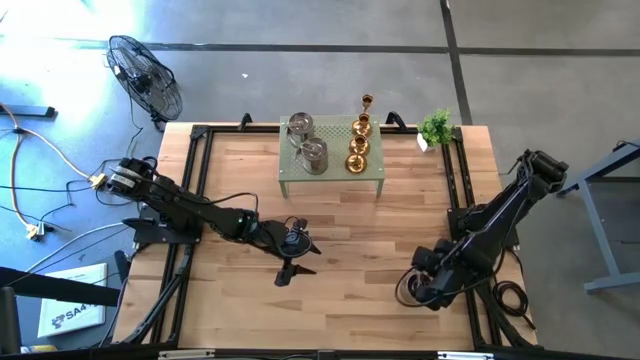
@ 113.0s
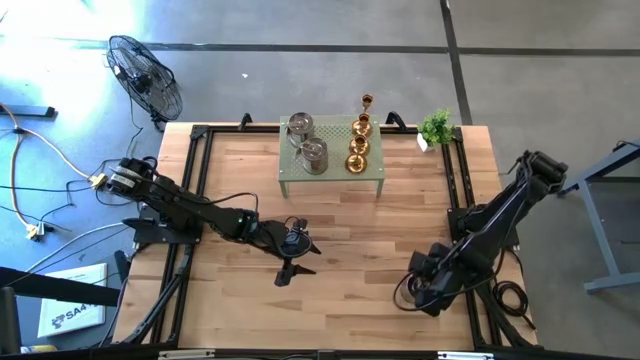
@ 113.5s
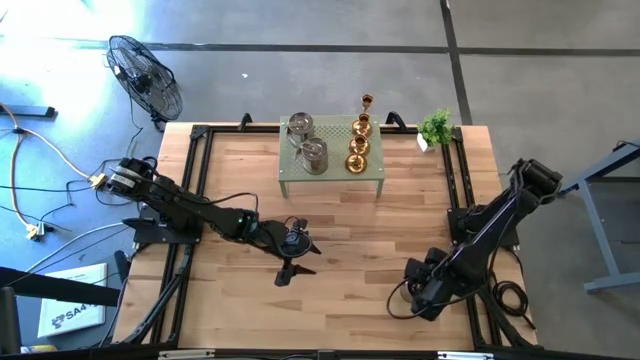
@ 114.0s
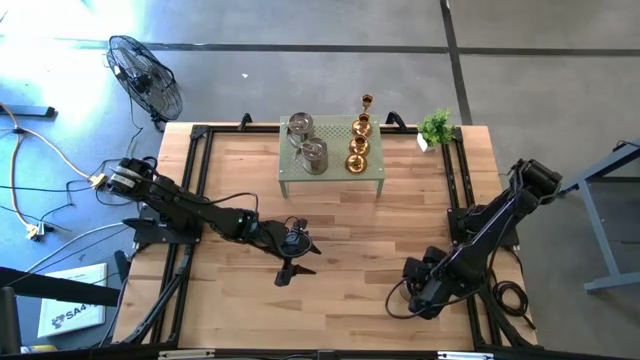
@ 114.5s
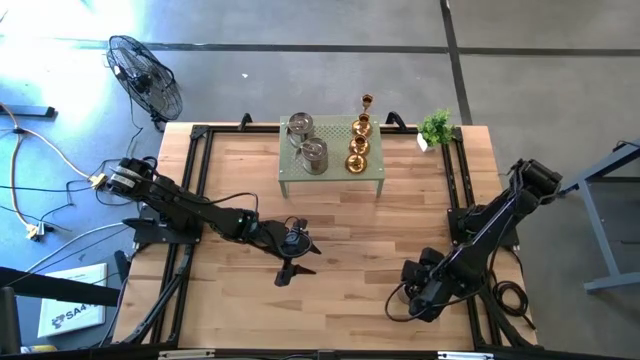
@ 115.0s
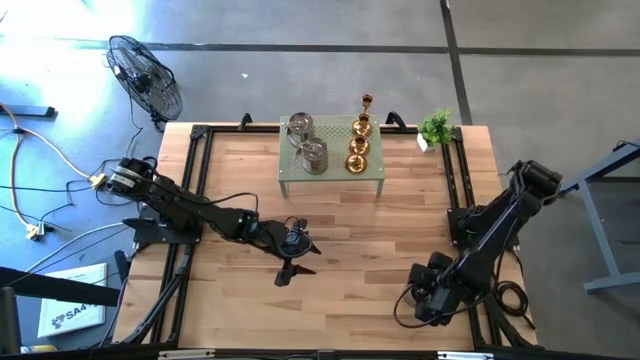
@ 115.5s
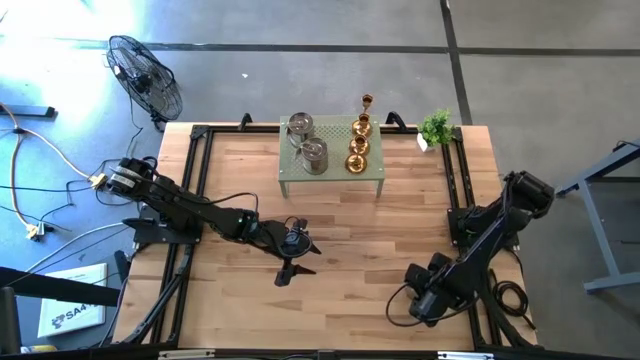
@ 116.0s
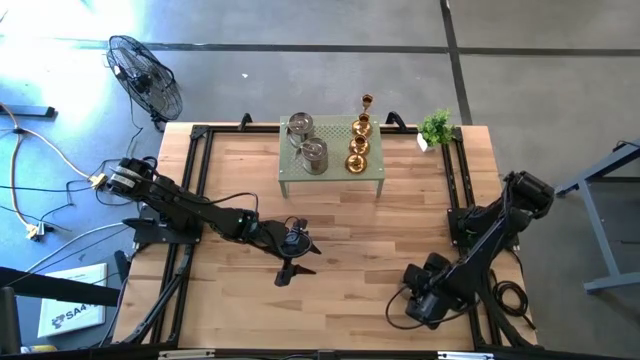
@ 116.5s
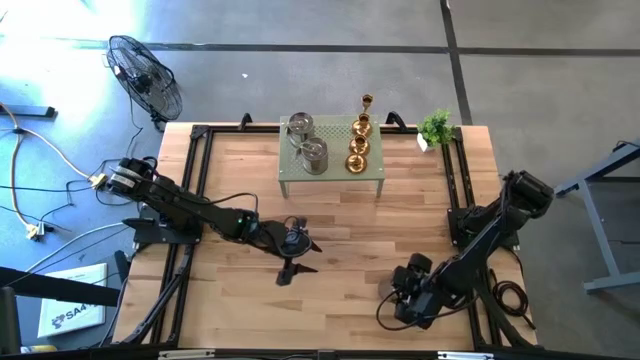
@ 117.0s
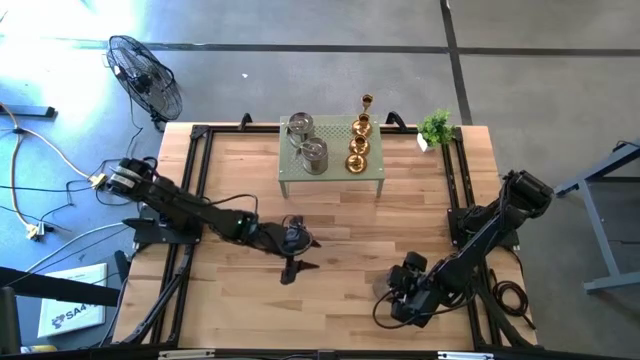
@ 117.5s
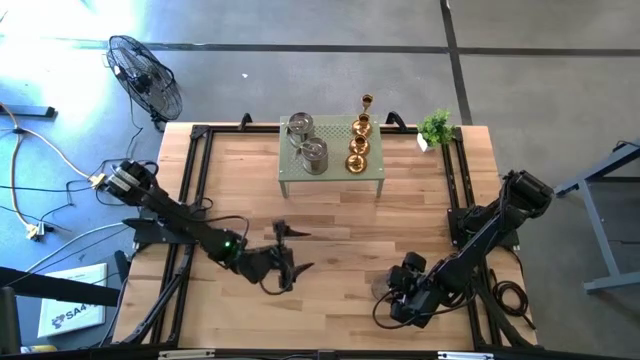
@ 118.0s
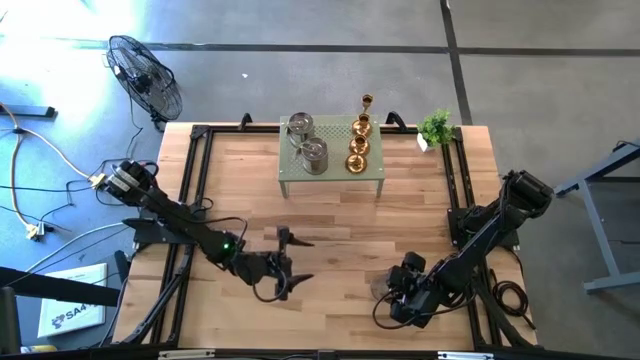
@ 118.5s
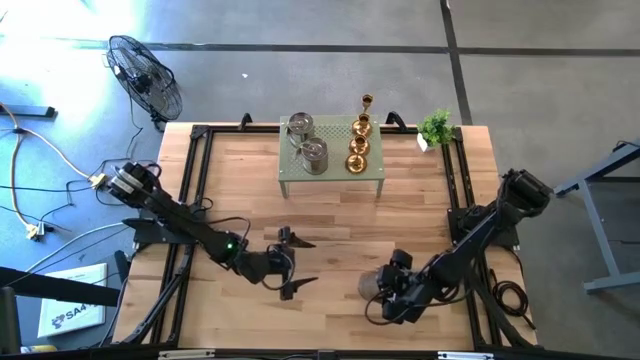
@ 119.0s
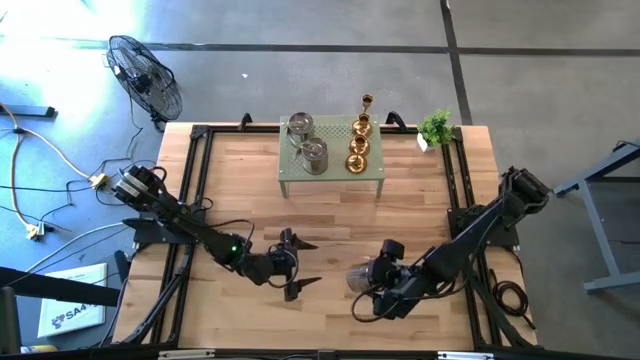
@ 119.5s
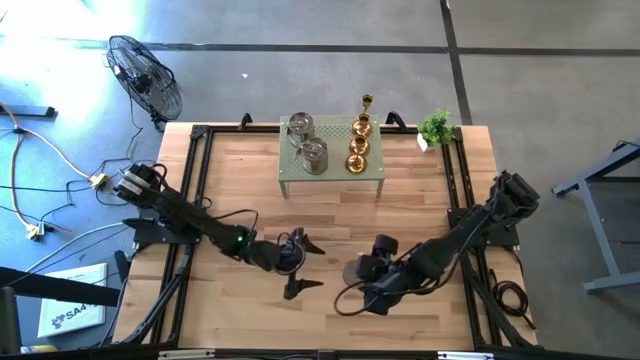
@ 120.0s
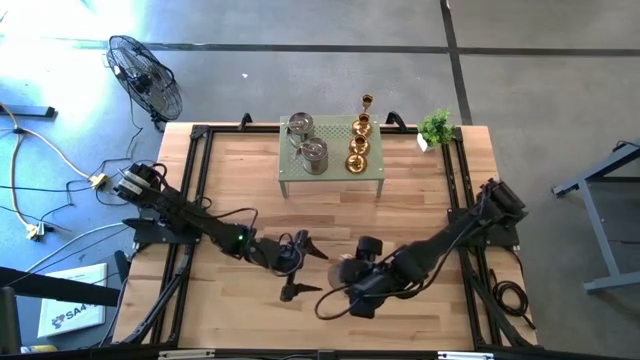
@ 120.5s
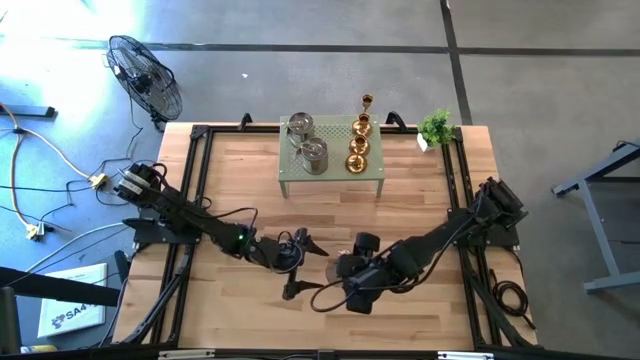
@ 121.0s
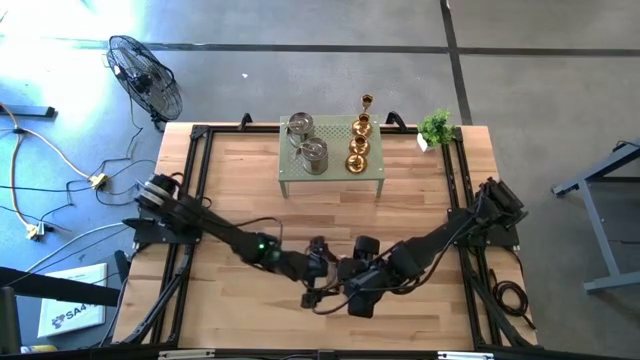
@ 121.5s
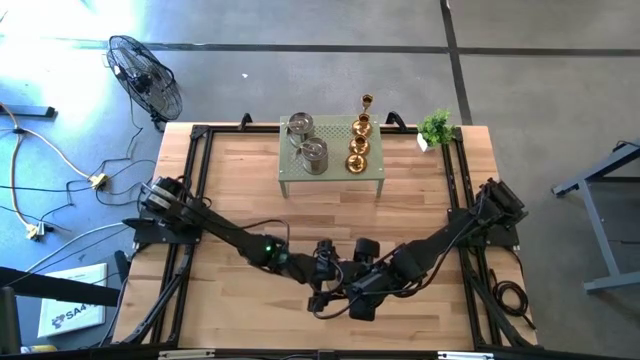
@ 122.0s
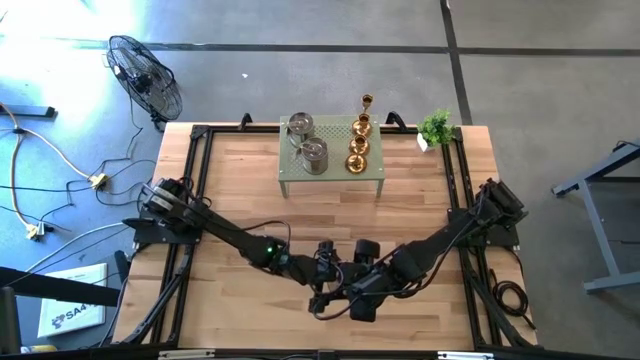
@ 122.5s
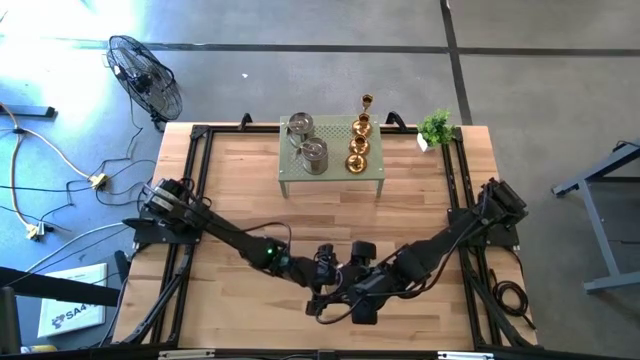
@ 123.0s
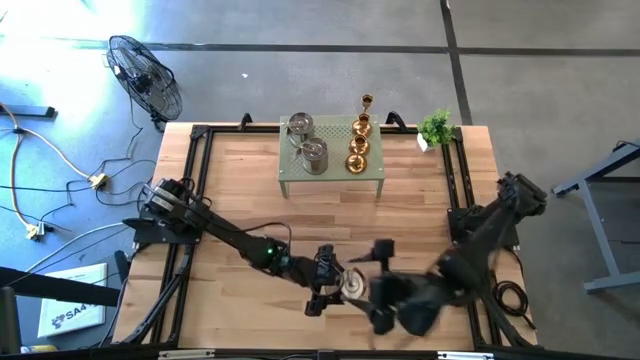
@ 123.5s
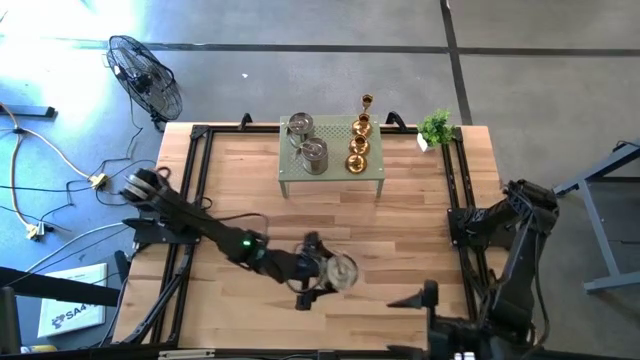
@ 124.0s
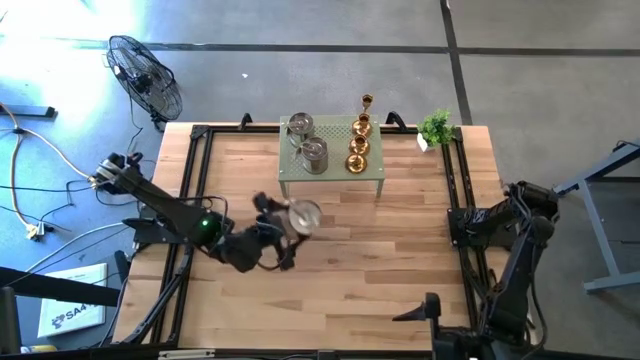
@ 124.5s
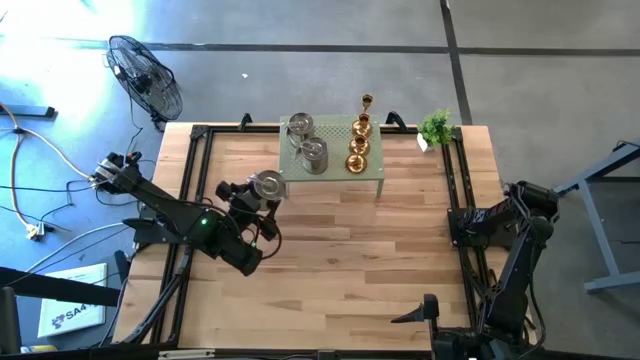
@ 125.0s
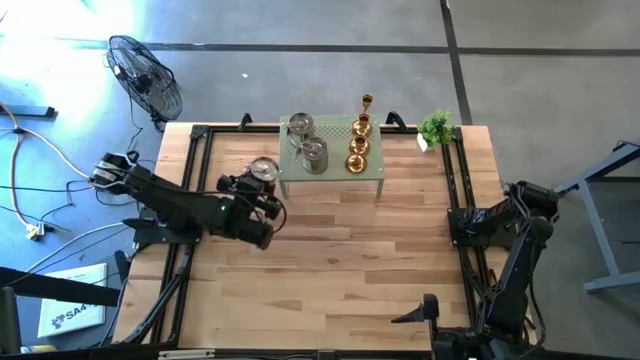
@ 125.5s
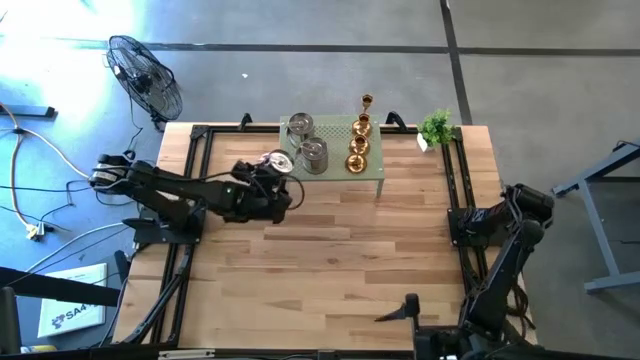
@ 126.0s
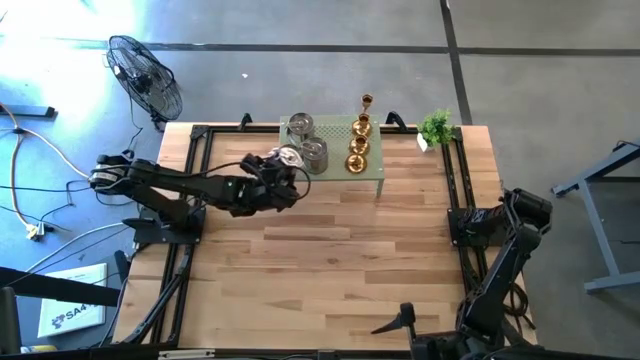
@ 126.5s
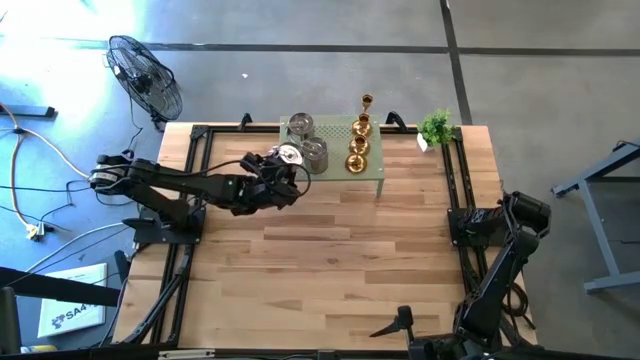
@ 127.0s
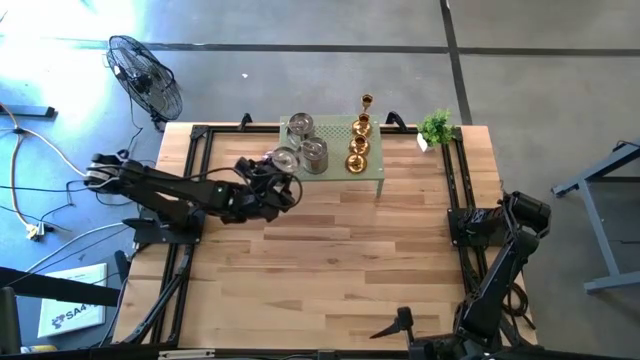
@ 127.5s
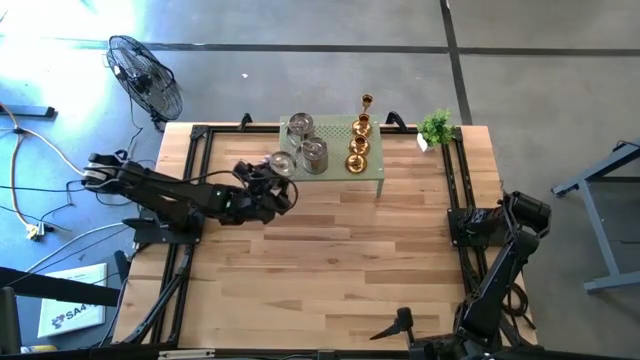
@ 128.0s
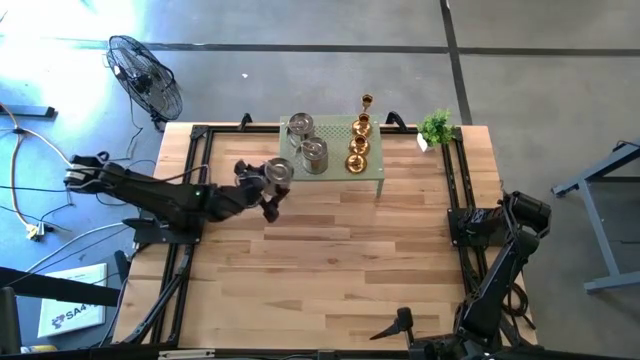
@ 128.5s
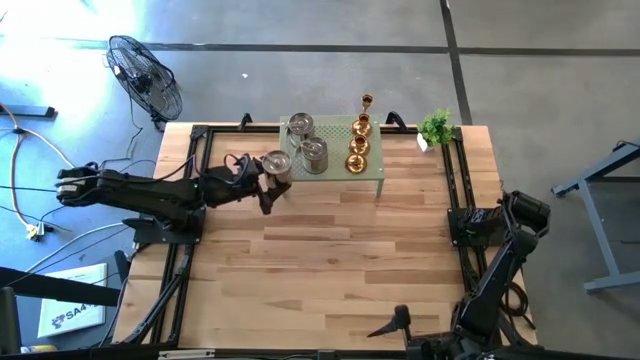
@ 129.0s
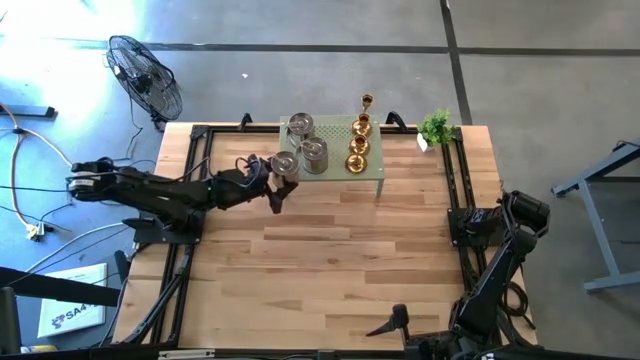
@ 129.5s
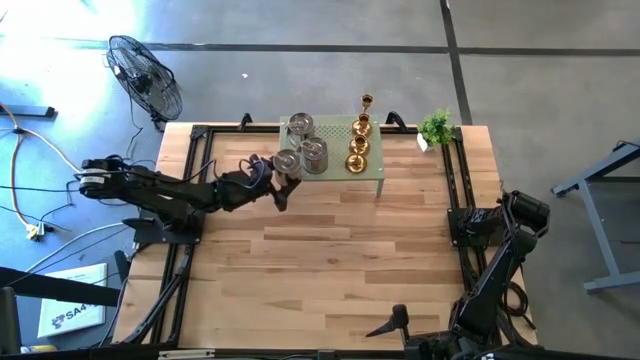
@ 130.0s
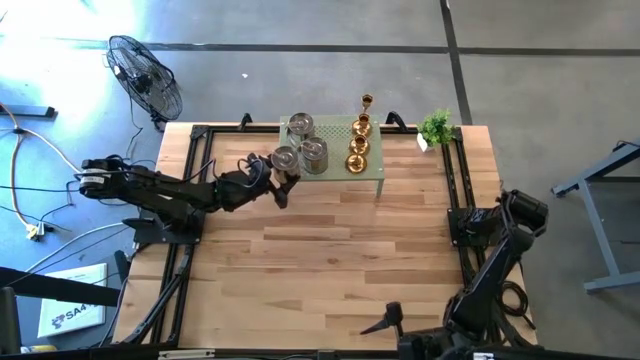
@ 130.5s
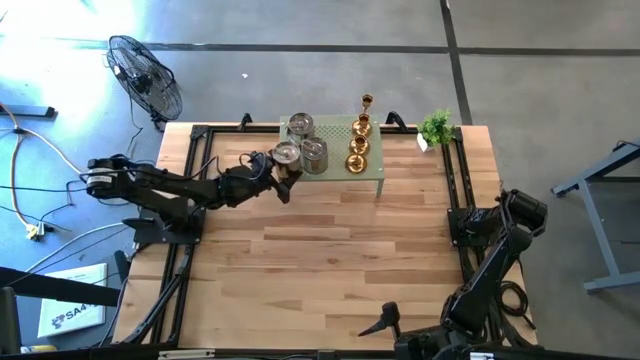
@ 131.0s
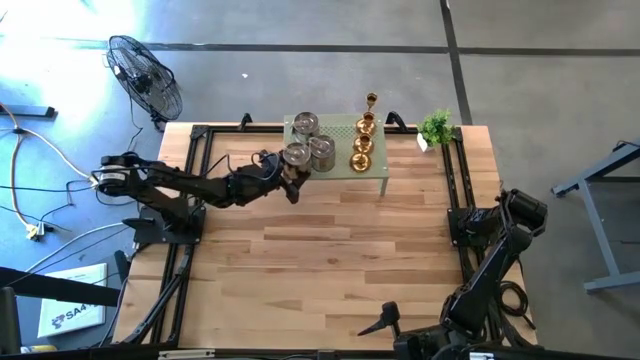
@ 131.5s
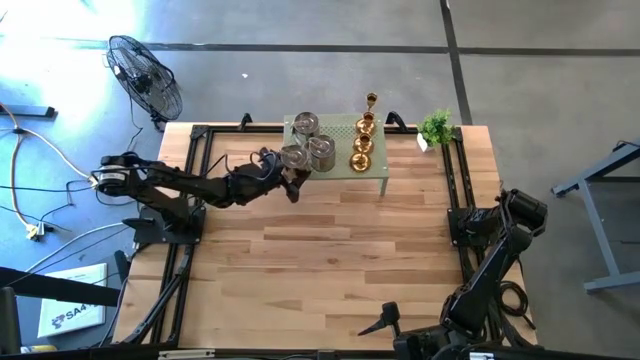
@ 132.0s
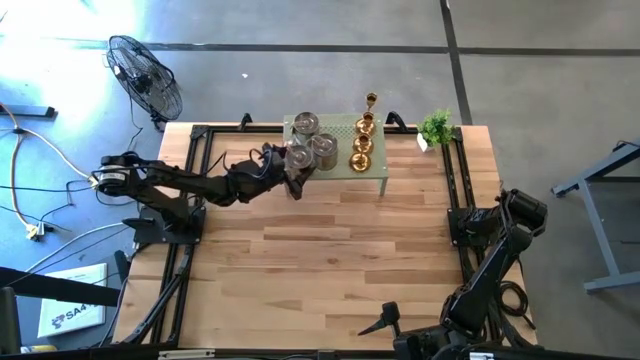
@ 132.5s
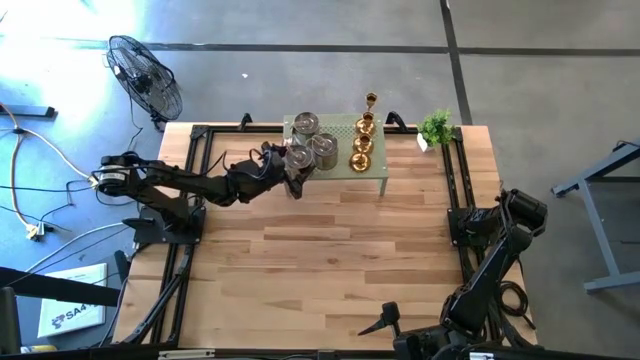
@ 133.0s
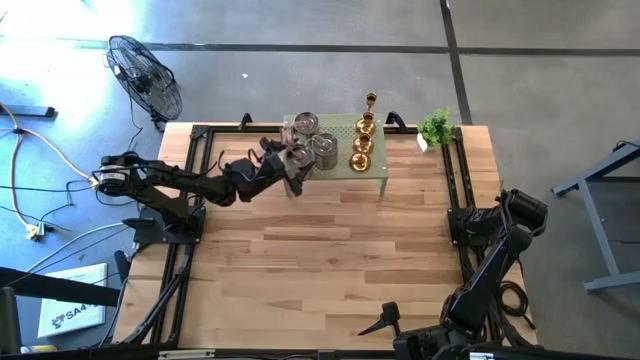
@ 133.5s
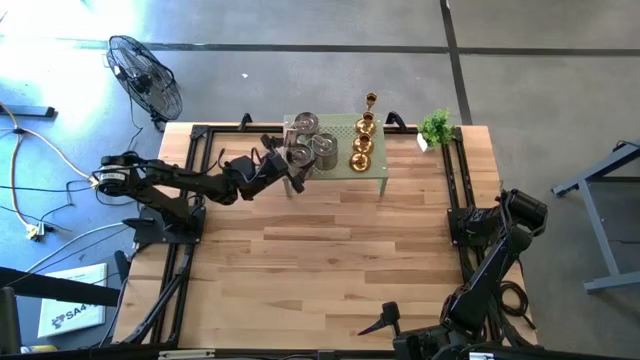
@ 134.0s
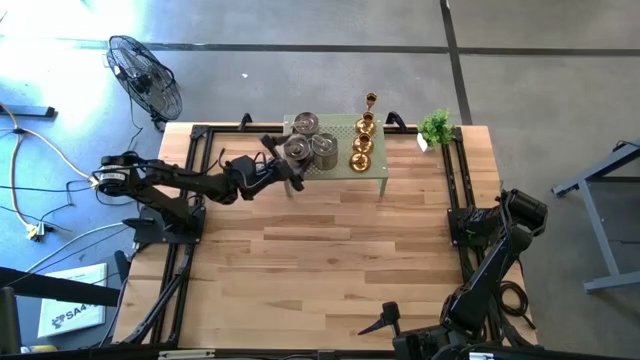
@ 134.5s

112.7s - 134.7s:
Task: Pick & Place candle stick holders
Put the silver scented candle on the shelf
